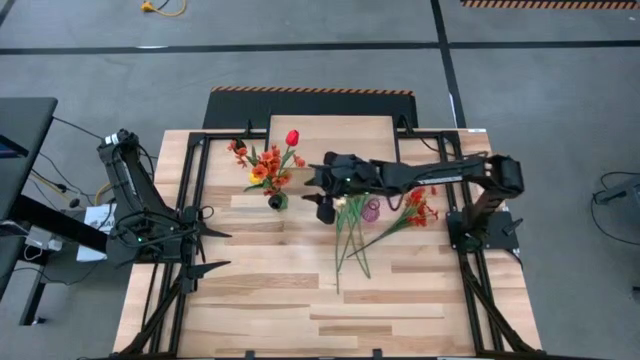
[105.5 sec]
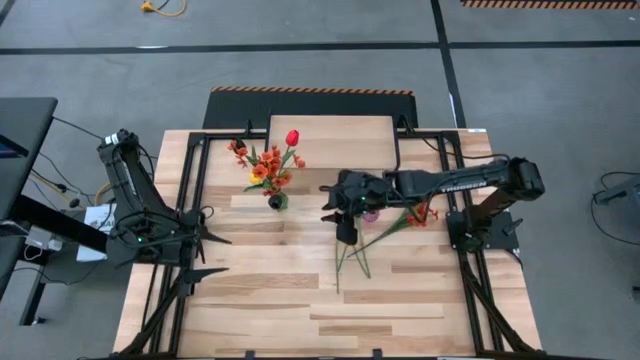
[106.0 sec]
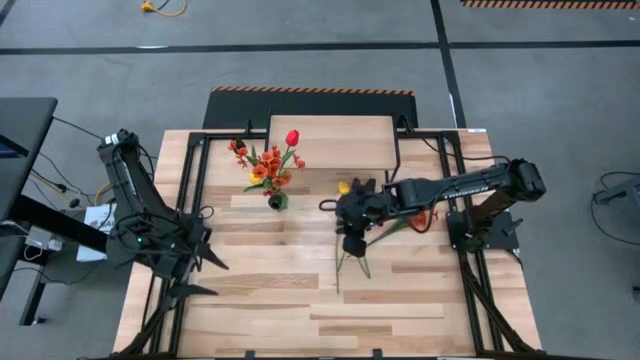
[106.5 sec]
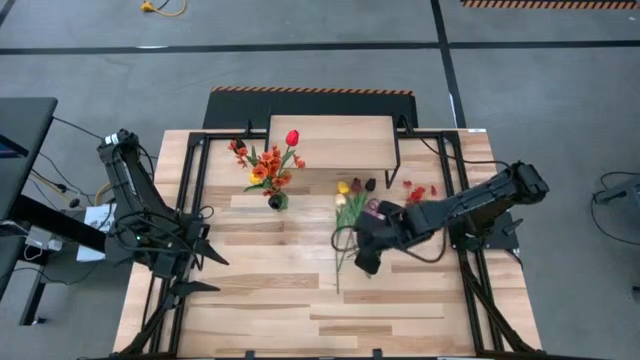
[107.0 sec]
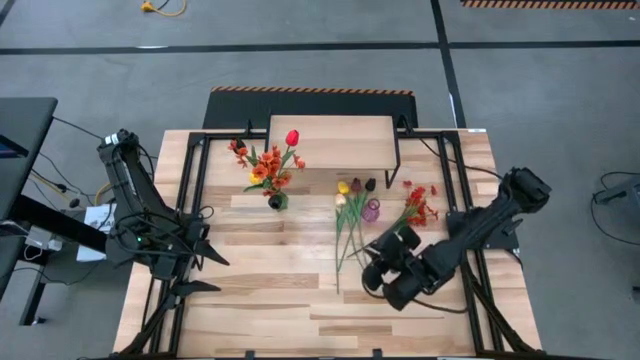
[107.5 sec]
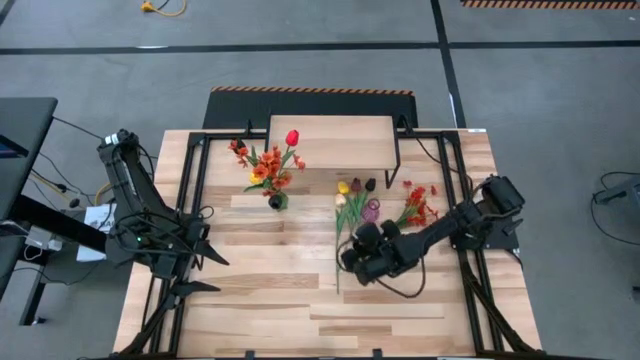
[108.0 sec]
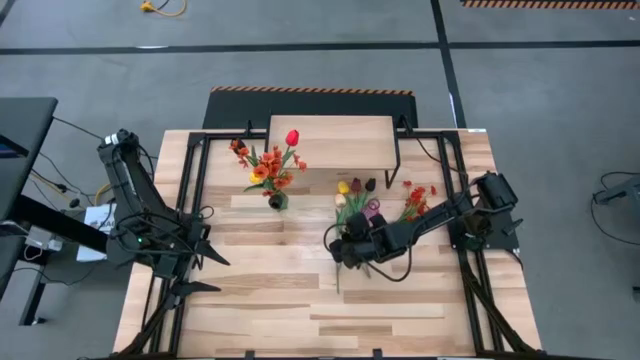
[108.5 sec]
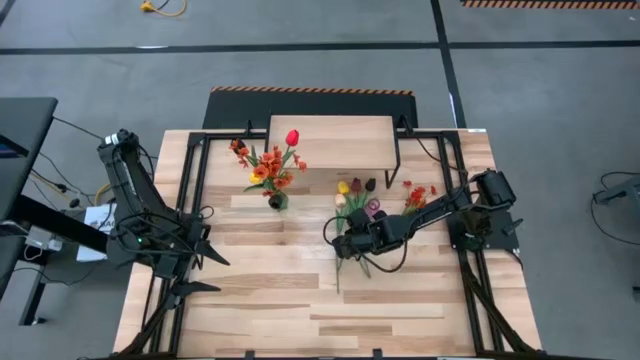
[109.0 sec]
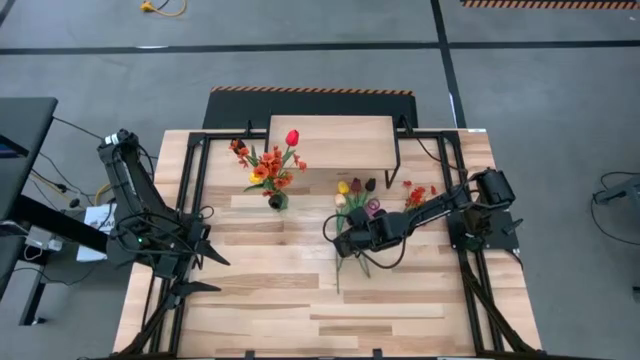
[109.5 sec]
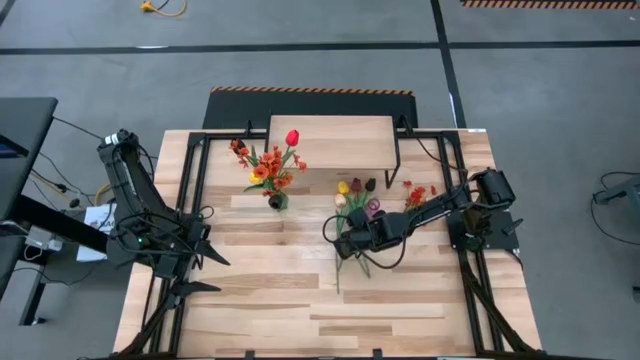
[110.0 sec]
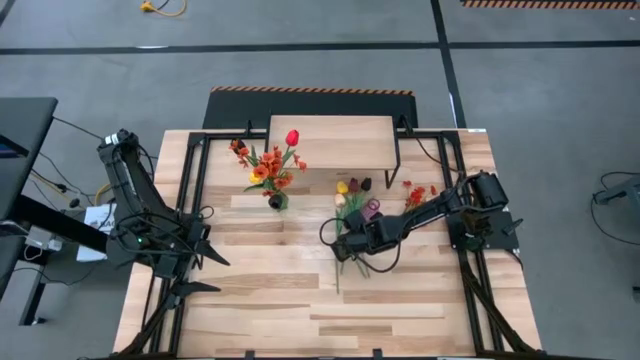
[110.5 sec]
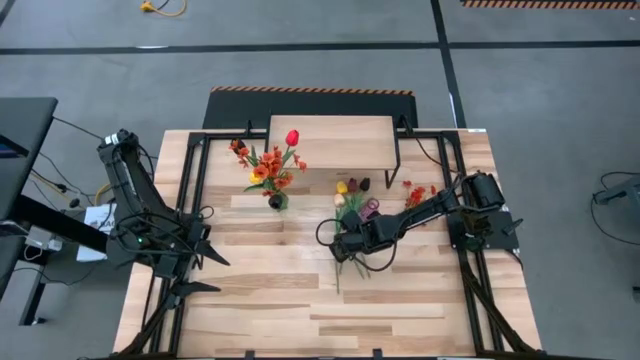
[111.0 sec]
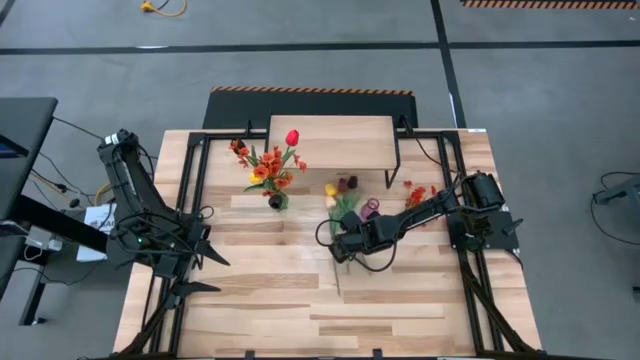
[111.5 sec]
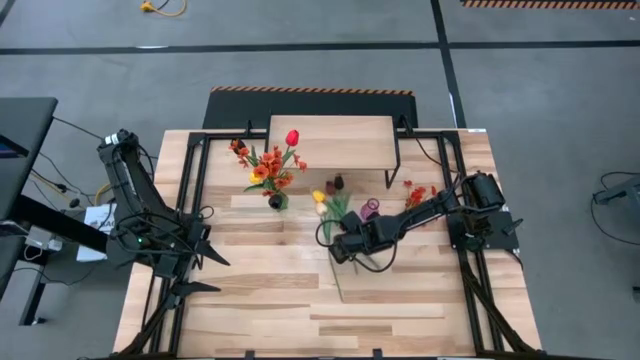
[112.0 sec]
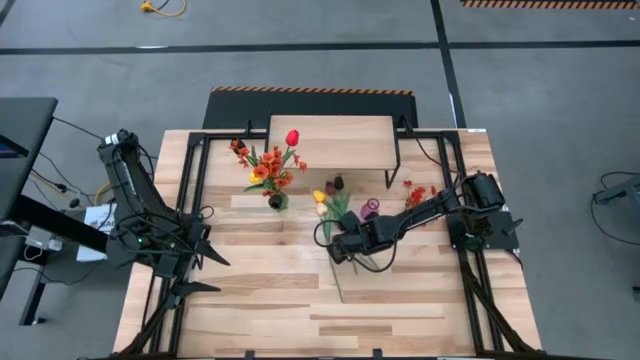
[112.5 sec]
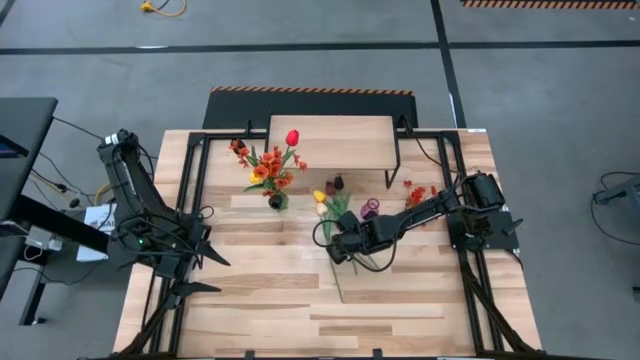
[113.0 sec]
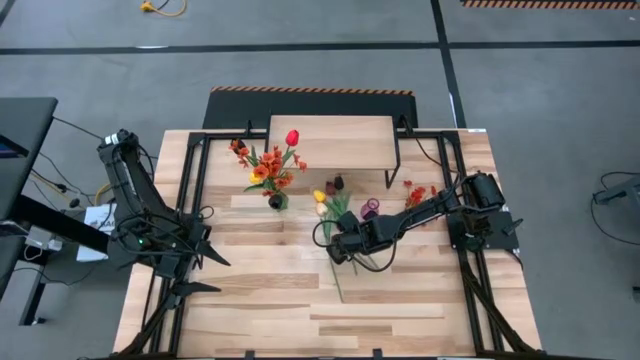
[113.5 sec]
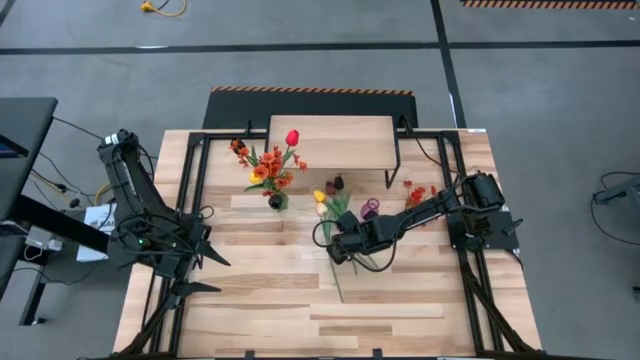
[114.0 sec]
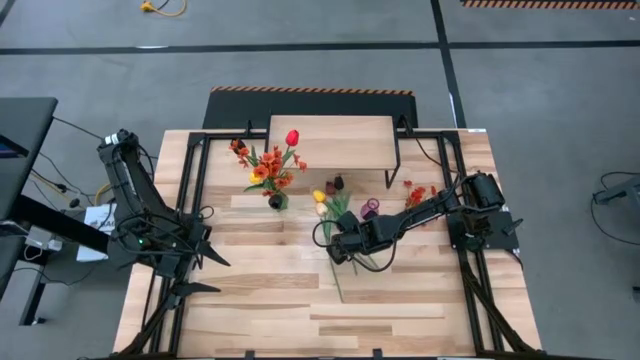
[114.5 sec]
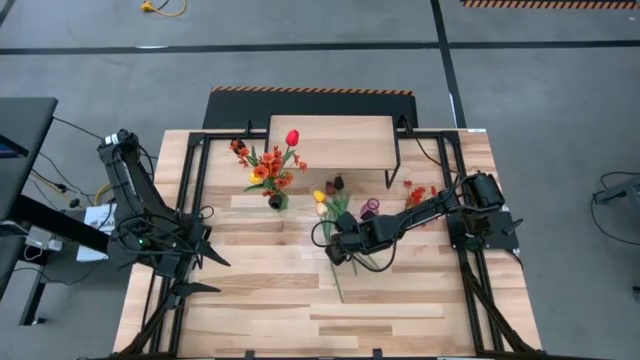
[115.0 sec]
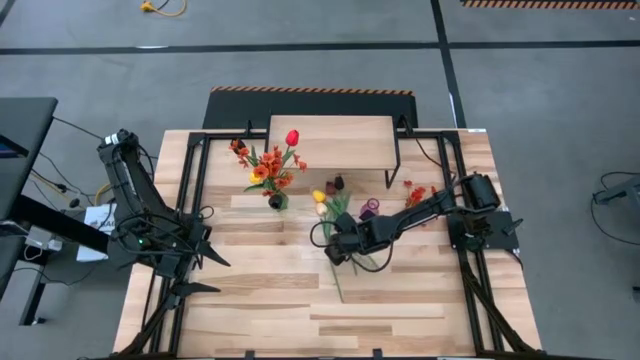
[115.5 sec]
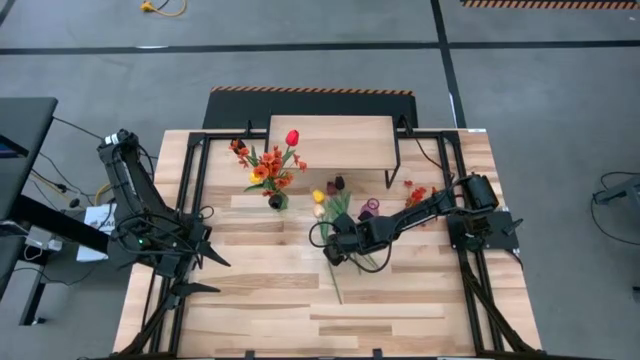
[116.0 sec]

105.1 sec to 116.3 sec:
Task: Pick and place flowers into a vace then onto a shelf
Put the yellow tulip into the purple vase

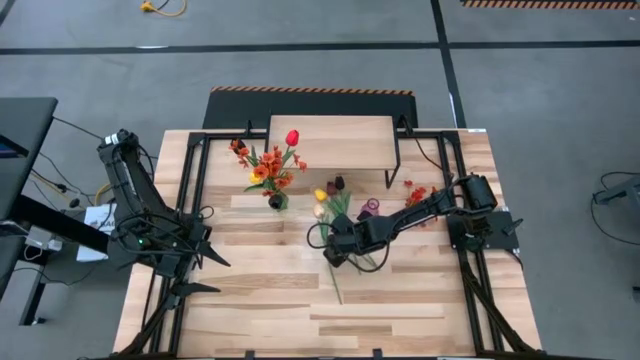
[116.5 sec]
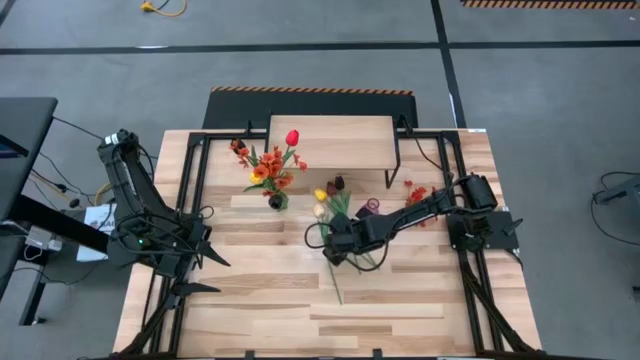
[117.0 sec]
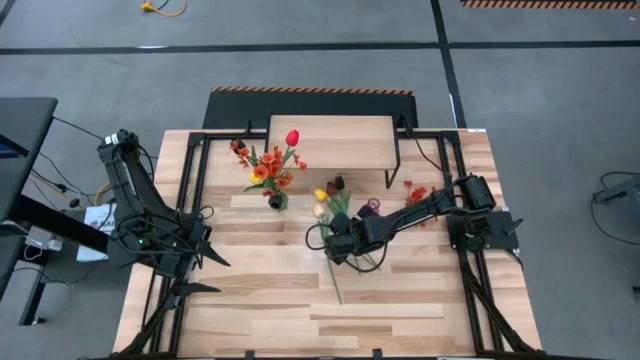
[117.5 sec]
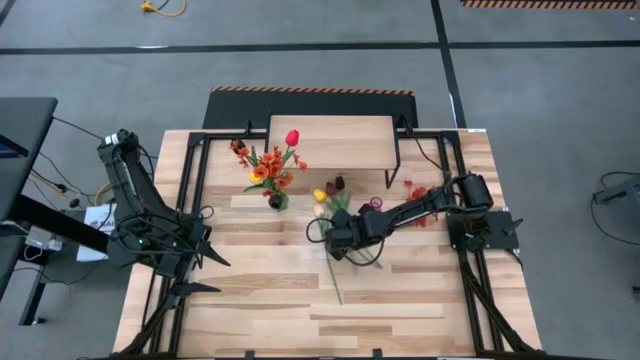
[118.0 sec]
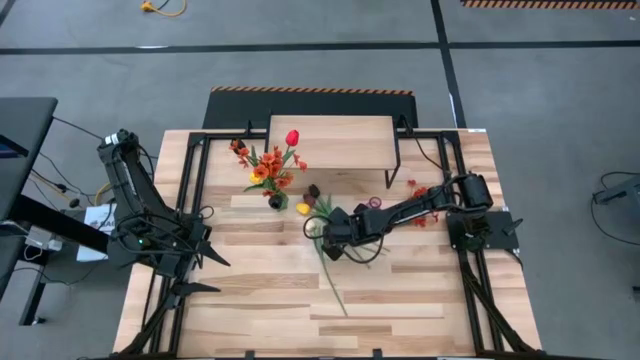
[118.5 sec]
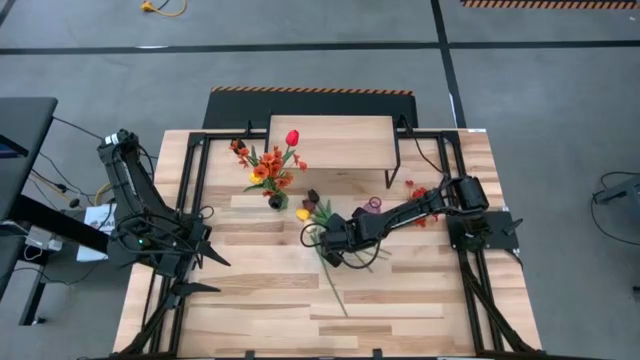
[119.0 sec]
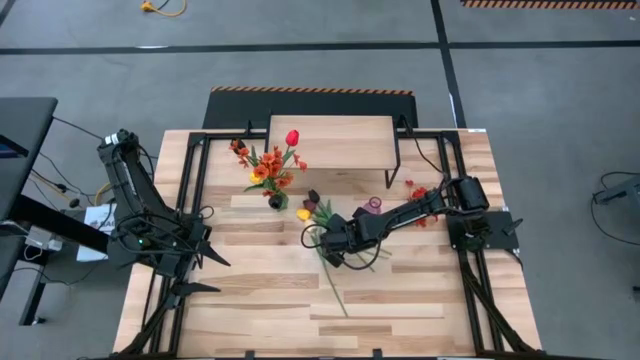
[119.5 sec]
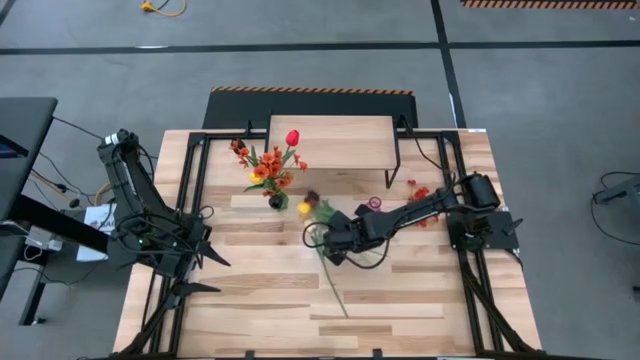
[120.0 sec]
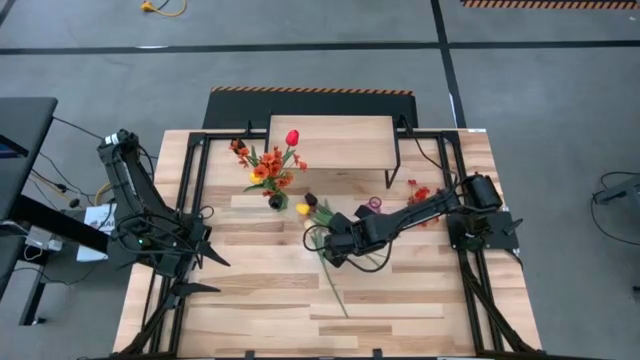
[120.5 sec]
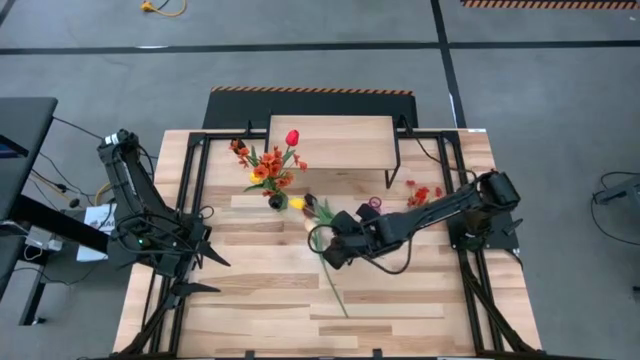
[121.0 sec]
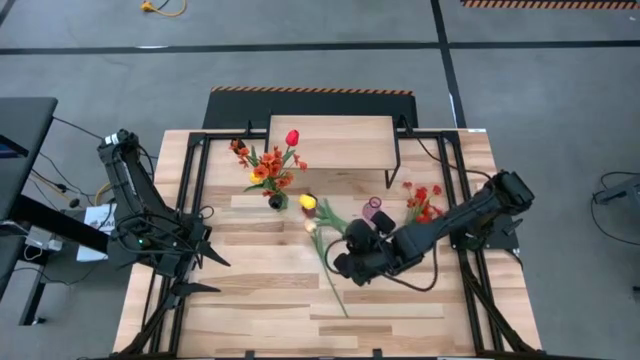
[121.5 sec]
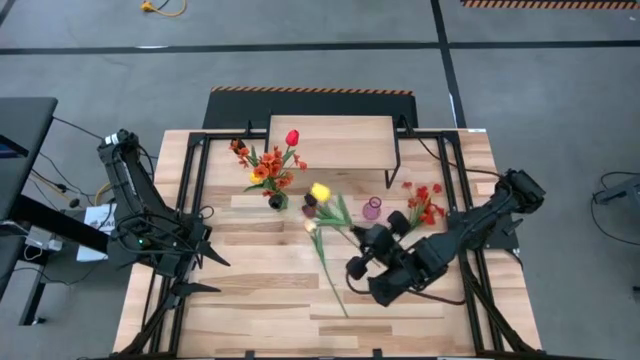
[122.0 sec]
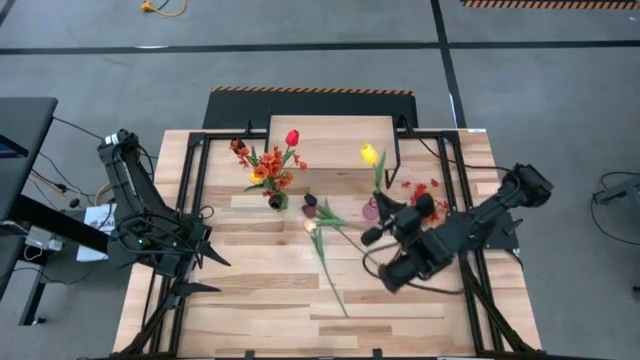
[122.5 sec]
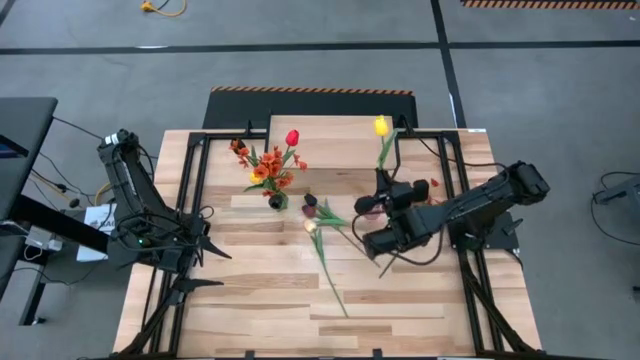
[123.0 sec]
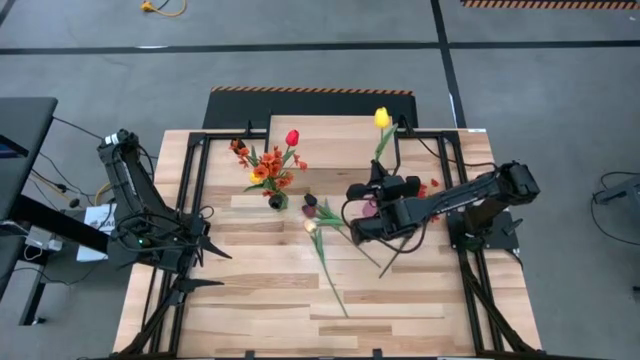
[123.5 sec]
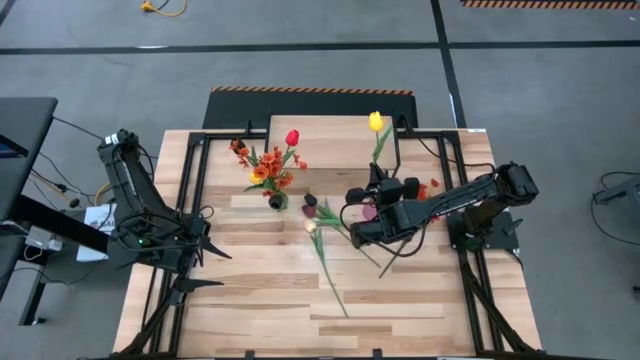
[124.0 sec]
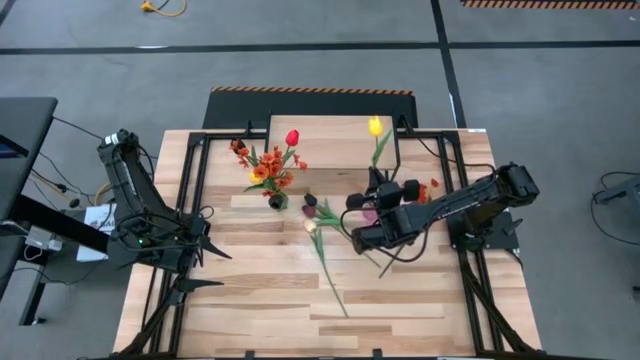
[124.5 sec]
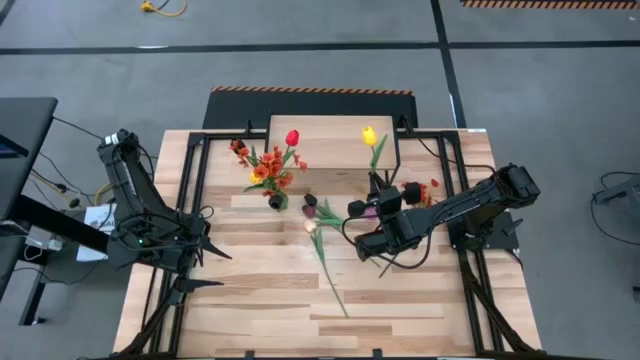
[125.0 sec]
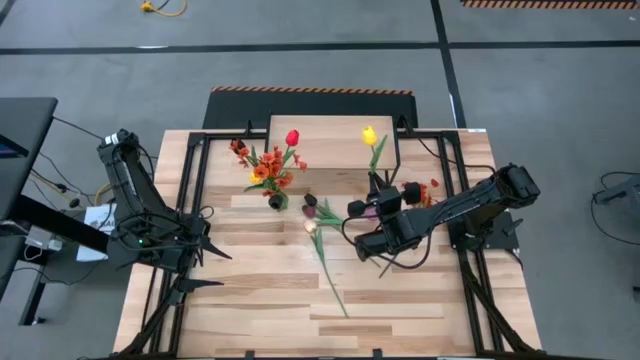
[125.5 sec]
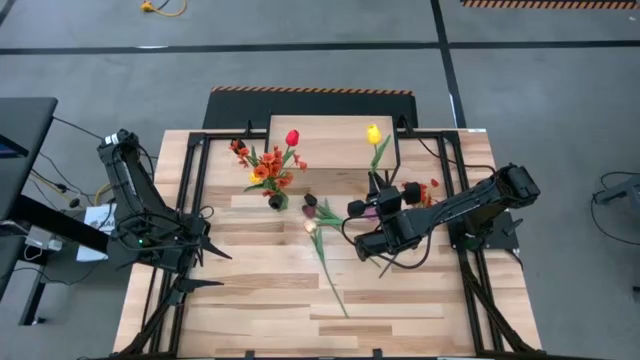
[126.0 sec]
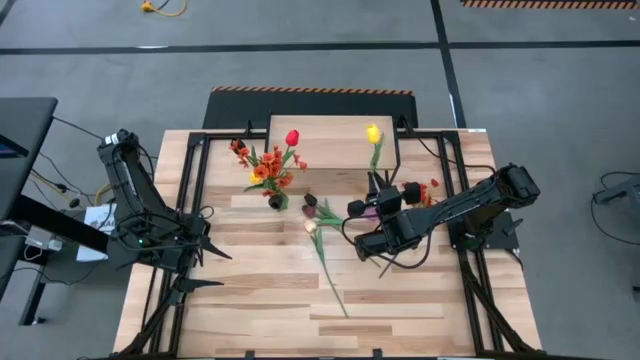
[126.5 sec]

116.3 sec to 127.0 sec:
Put the yellow tulip into the purple vase
